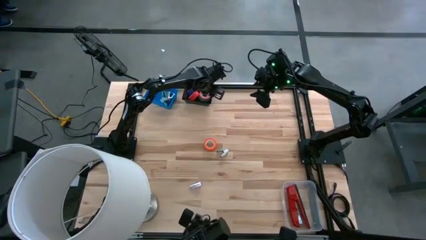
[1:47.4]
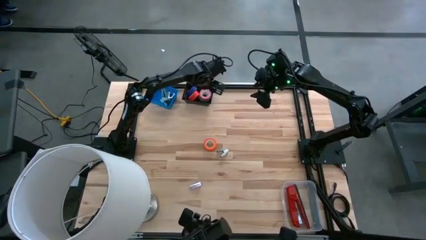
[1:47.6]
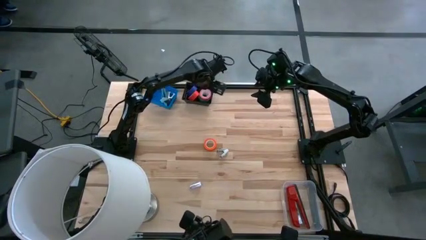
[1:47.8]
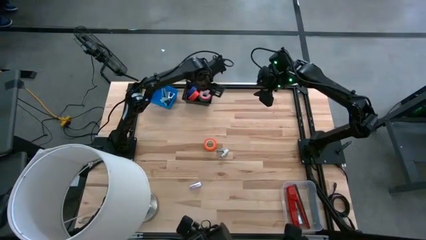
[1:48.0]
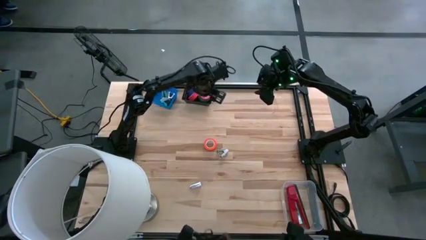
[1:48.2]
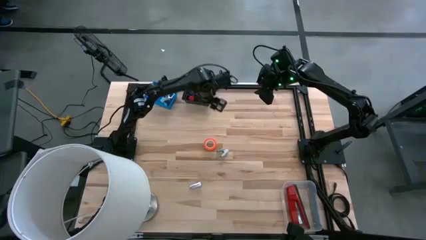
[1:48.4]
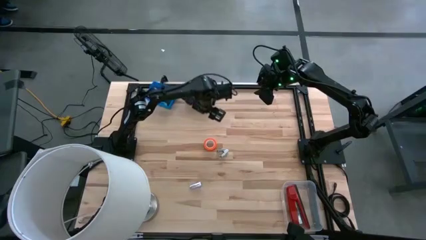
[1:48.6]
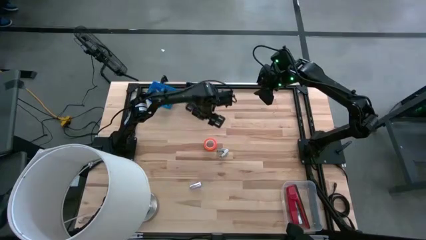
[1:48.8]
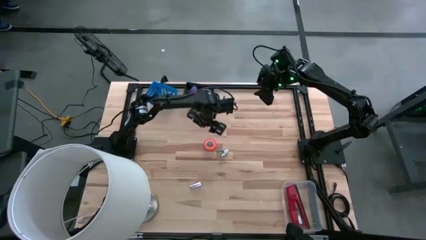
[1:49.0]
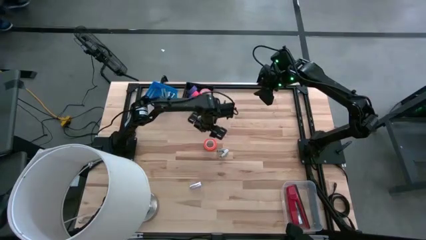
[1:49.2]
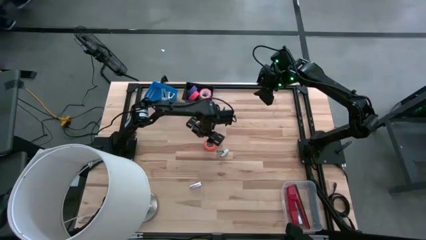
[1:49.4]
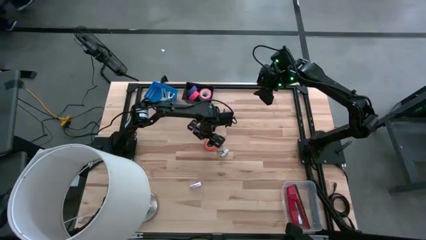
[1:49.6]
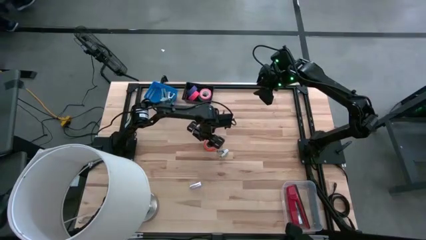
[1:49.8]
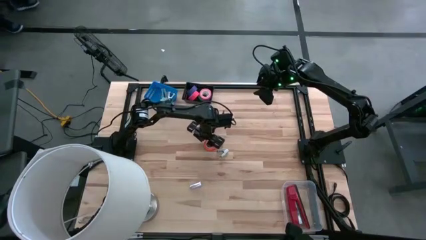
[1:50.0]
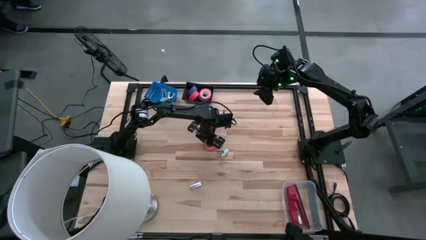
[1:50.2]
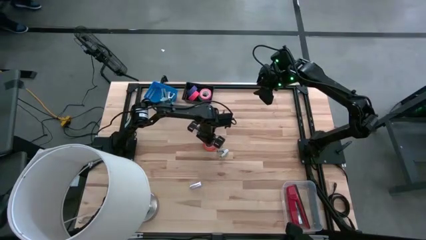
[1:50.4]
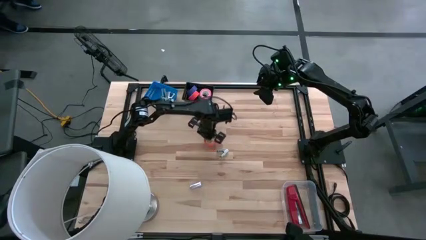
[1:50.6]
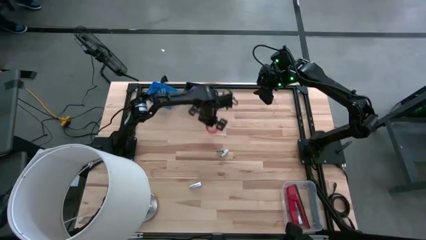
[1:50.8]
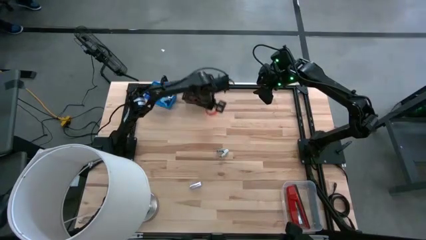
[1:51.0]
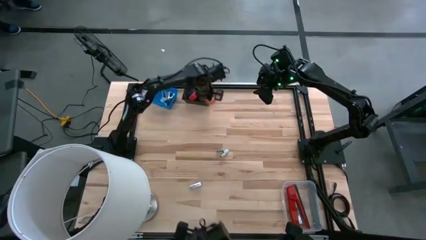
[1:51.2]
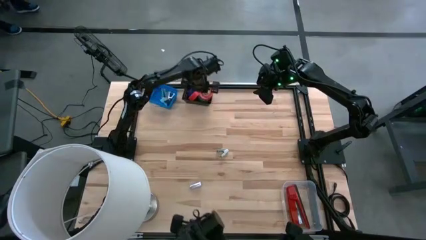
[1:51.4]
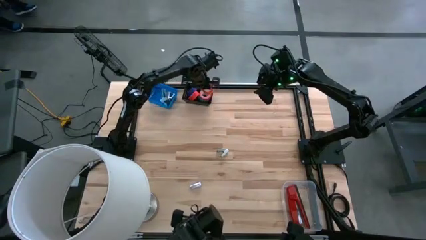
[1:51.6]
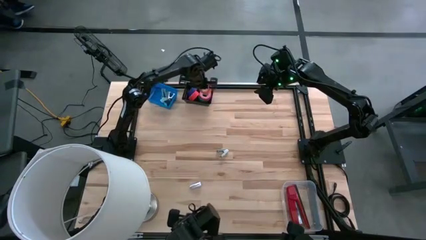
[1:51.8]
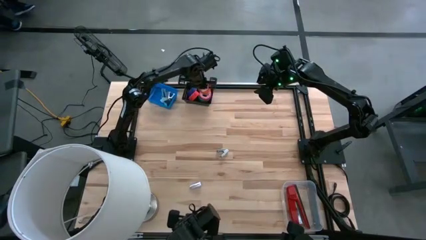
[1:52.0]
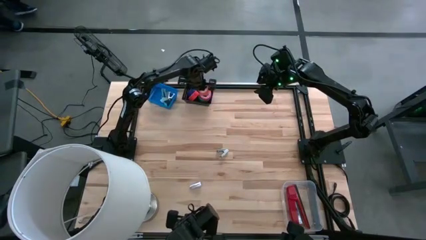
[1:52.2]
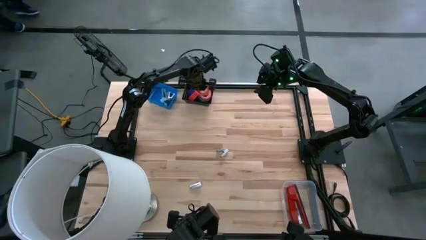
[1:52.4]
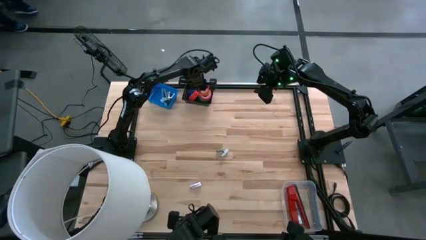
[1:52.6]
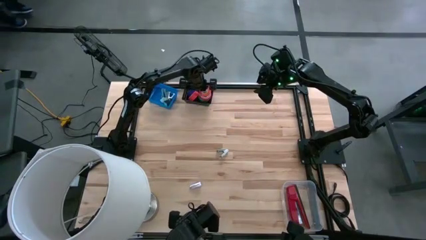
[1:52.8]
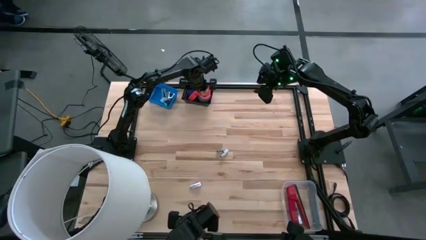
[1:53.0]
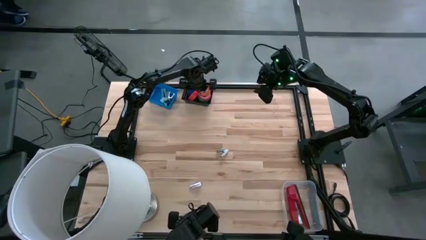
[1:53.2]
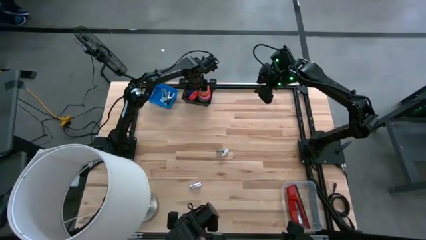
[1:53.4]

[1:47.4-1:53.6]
Task: Pick and place Stapler, Stapler remover, tape
Put the orange tape into the black bin

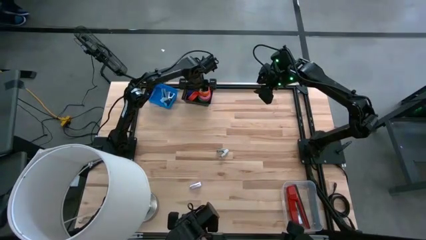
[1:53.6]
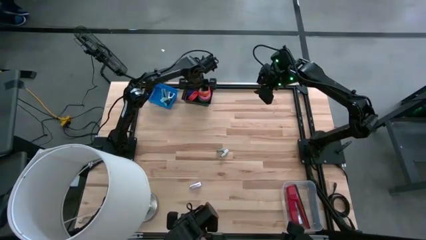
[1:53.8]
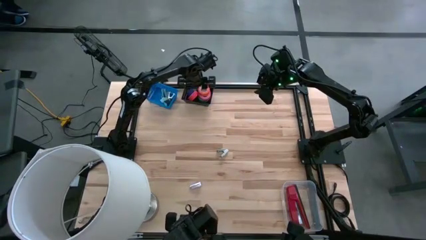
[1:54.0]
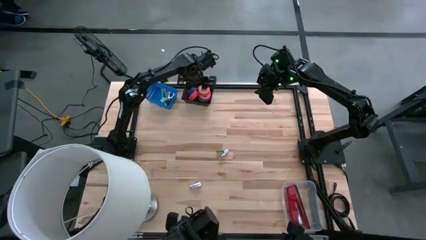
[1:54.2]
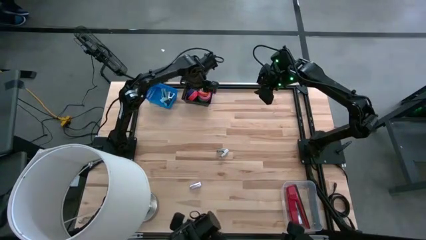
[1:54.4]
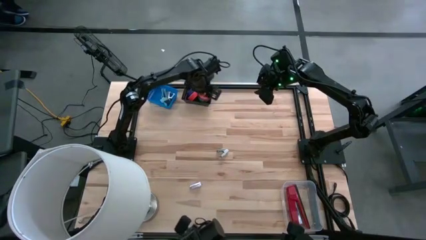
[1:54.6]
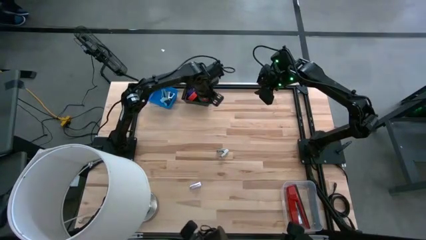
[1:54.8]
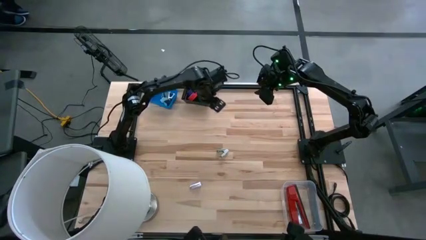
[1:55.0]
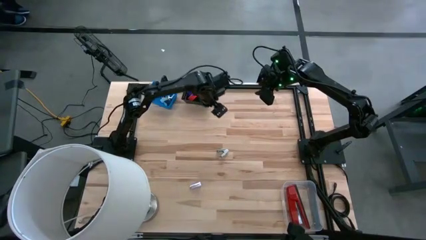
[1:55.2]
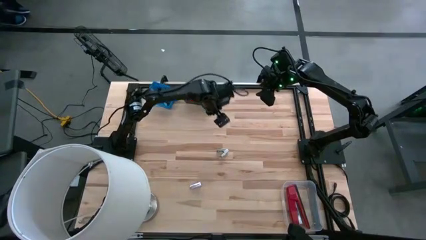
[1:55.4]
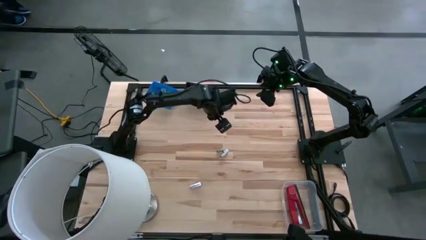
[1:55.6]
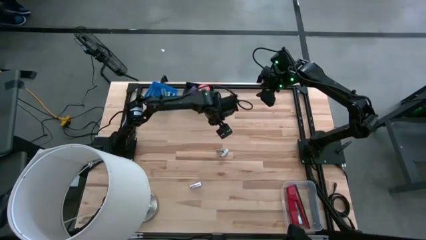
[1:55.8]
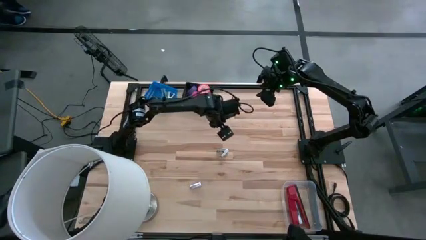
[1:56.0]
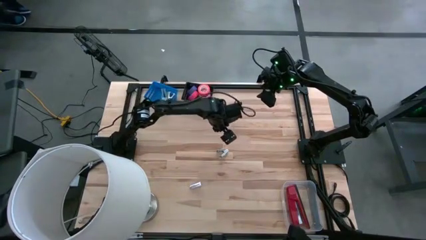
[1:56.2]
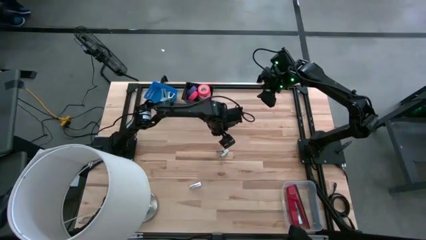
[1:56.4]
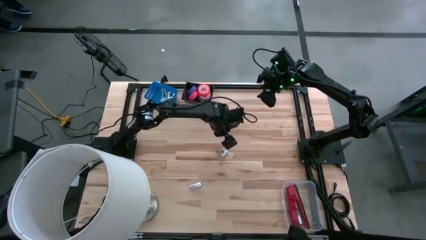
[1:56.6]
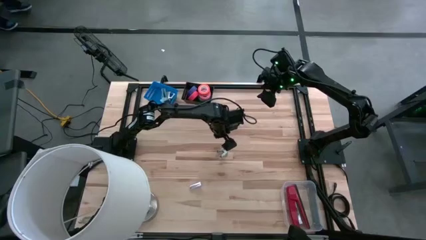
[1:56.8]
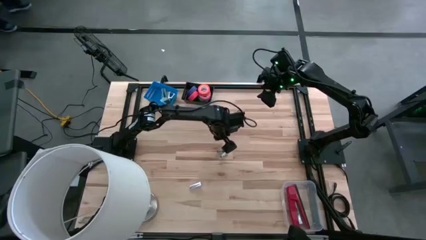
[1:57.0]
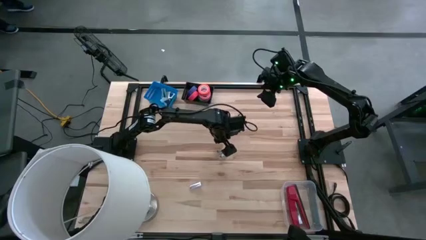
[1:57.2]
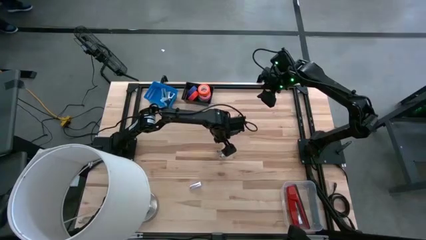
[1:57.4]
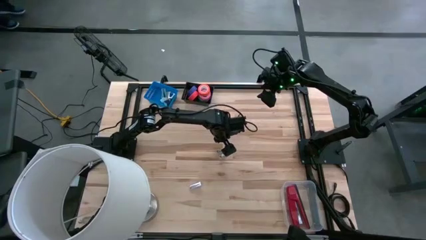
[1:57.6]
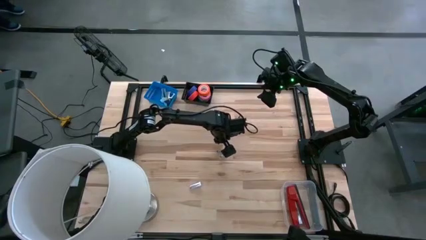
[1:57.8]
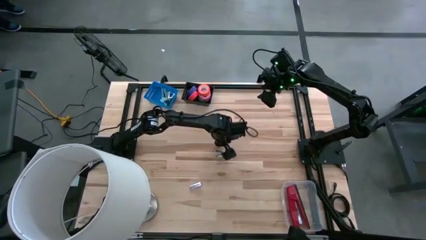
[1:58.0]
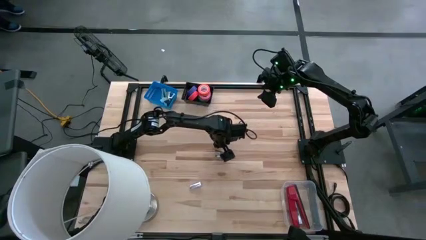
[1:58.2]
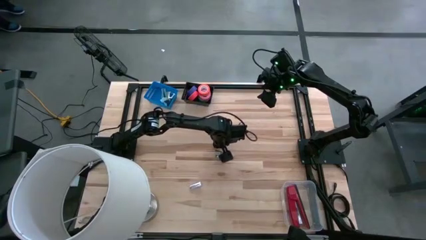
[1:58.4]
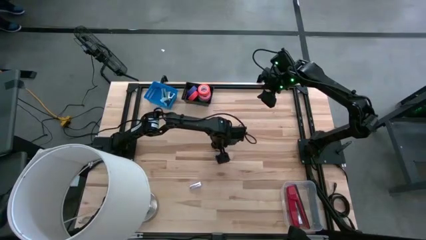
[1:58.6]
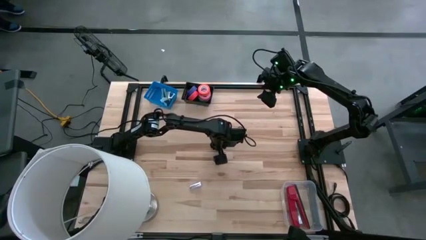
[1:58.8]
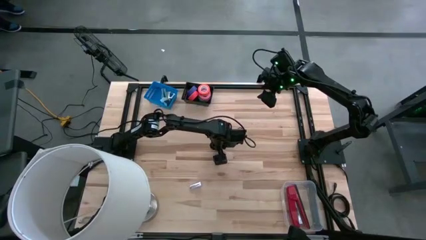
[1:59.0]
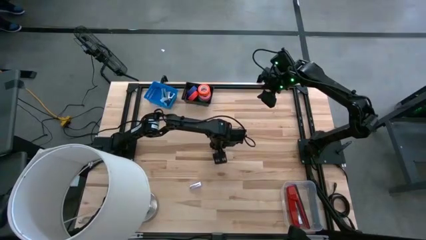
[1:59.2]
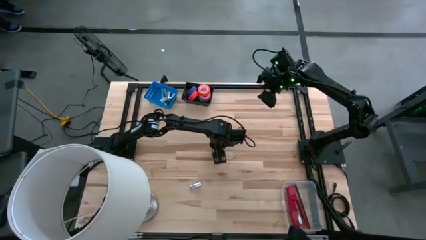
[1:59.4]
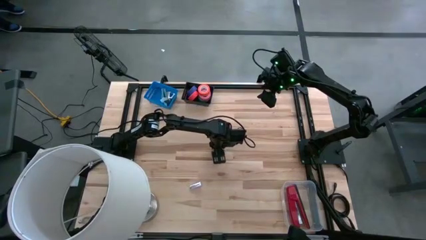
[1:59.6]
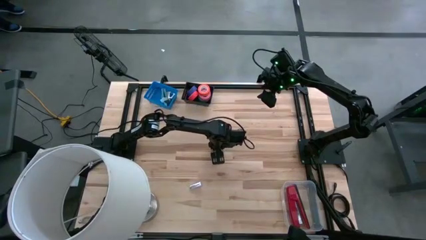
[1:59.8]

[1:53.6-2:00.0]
Put the gray staple remover into the blue bin

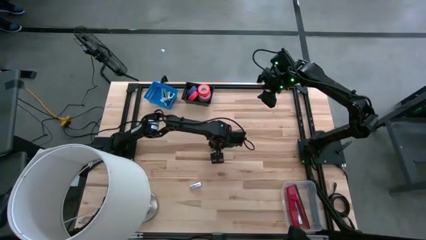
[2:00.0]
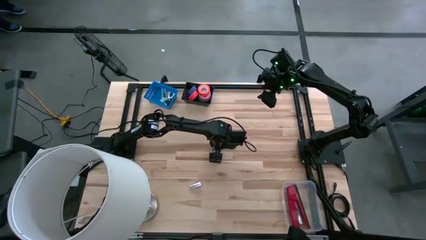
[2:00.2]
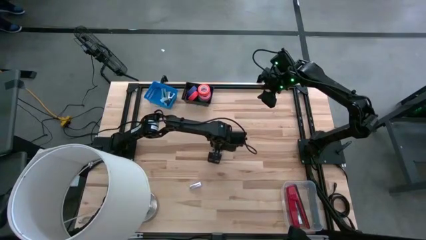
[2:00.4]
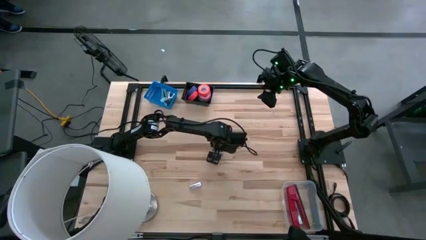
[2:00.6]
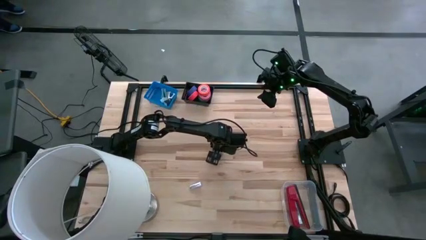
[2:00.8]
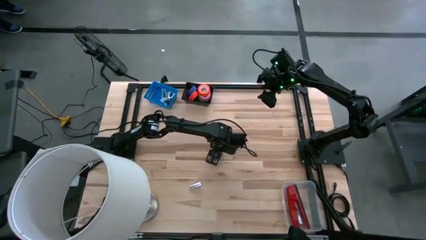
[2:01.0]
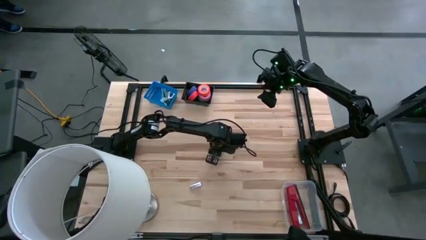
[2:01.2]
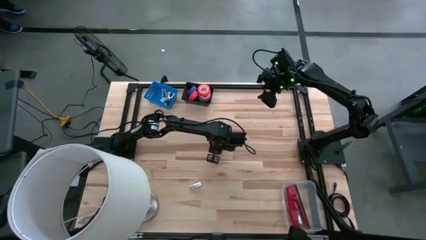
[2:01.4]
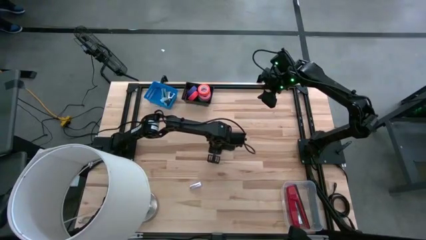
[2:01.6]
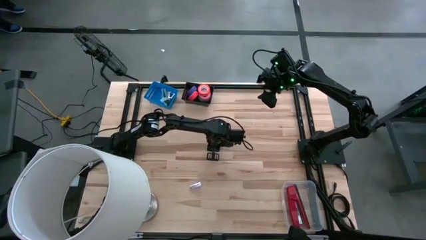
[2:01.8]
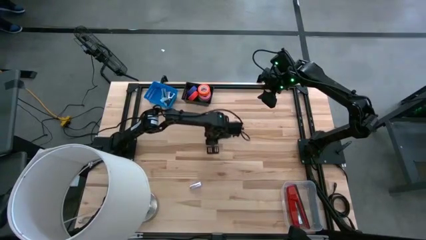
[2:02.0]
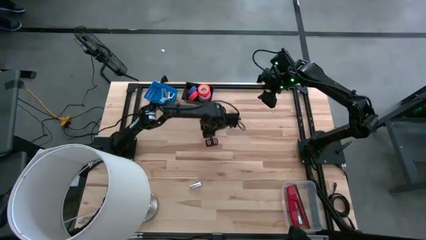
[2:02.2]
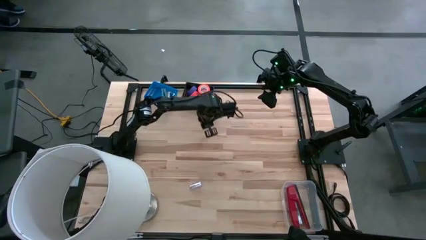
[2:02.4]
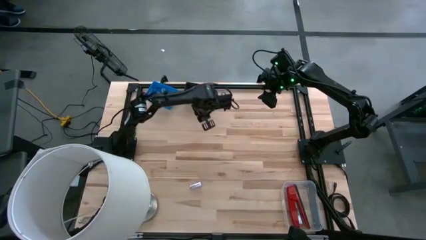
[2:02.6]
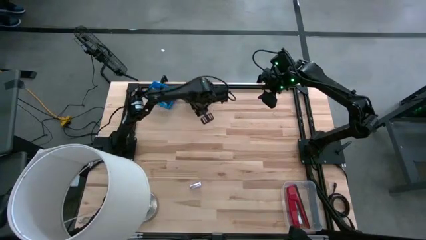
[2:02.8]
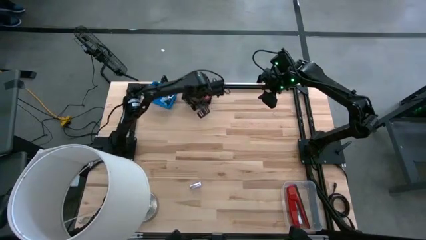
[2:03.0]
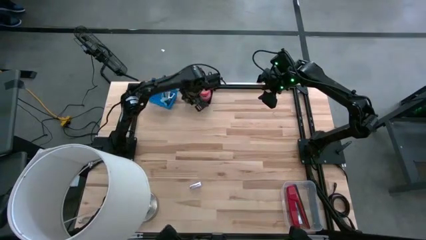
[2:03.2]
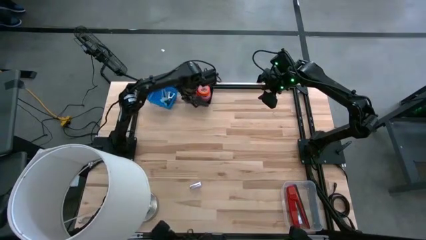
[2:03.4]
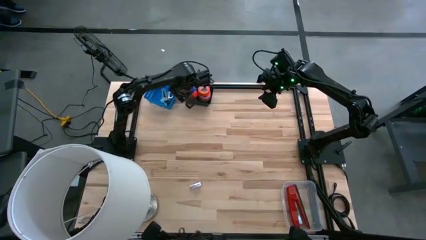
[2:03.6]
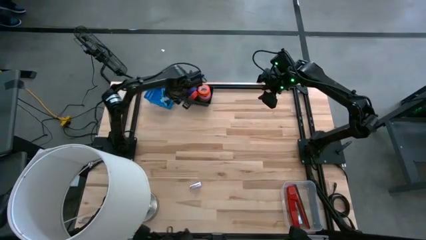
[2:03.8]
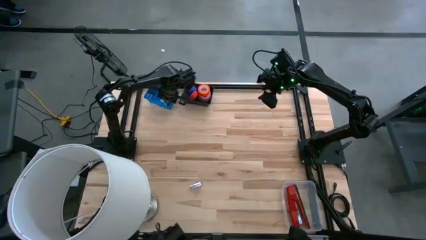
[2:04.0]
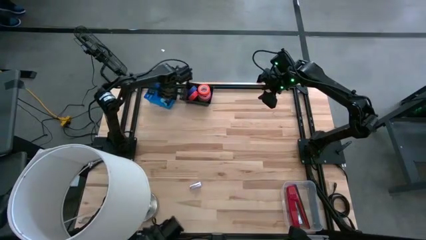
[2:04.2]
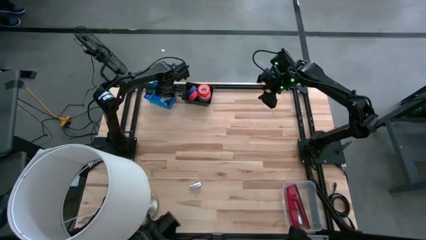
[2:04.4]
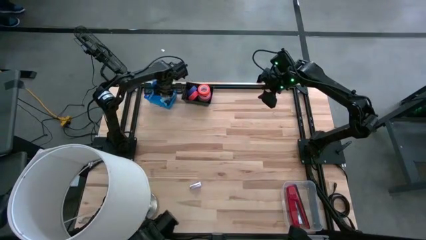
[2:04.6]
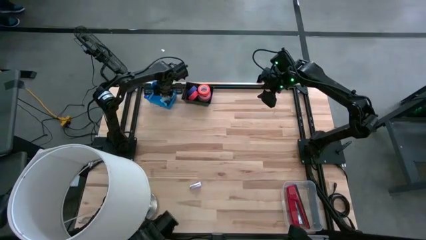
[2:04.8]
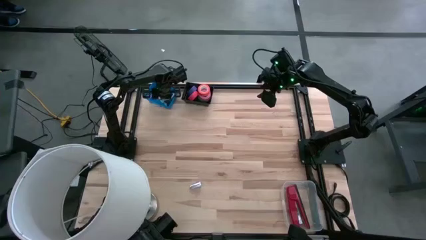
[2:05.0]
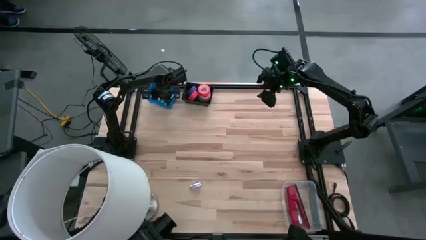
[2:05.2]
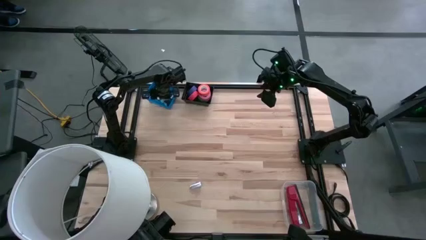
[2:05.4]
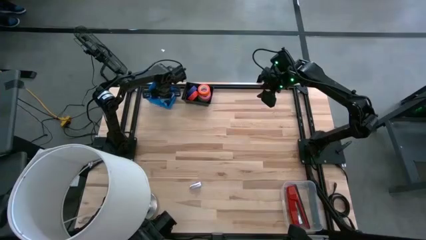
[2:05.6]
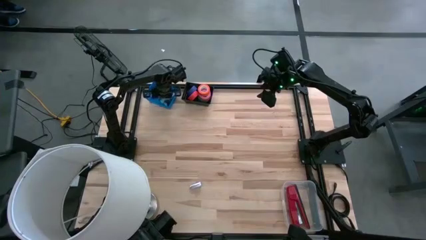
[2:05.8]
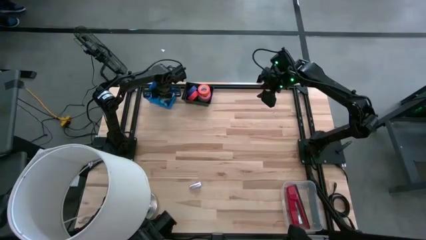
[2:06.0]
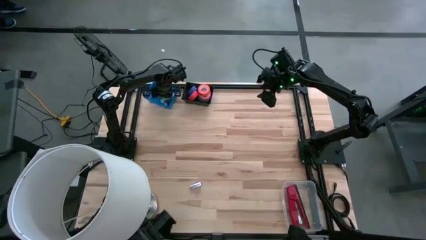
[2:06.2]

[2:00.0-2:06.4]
Put the gray staple remover into the blue bin
